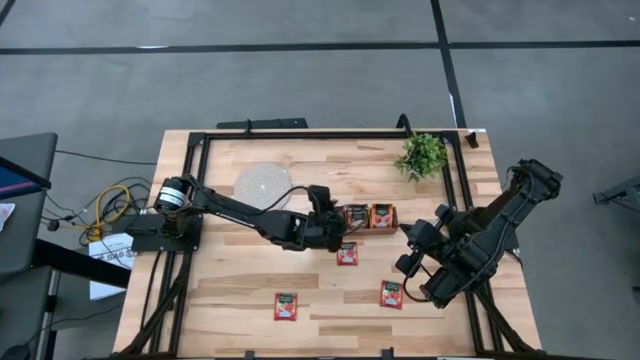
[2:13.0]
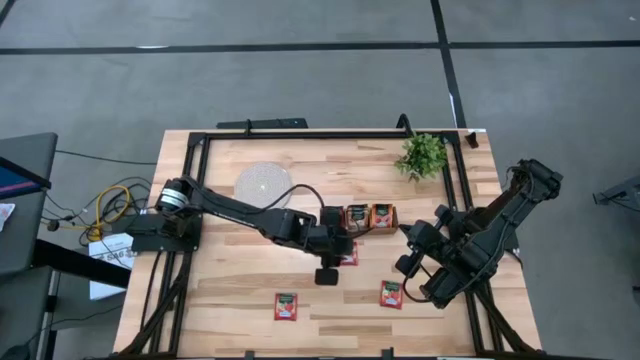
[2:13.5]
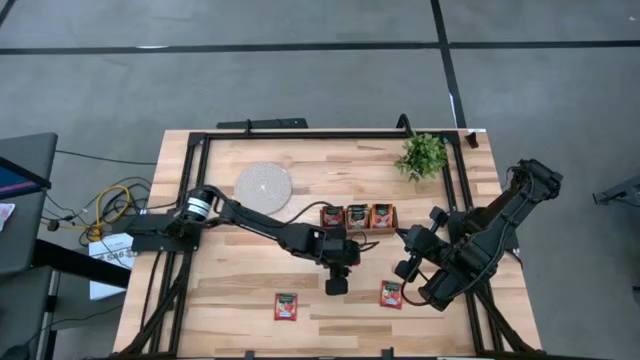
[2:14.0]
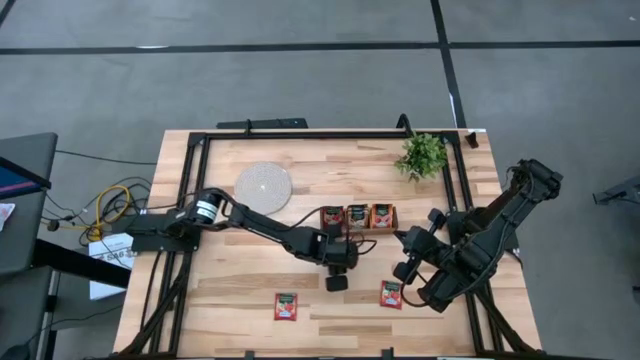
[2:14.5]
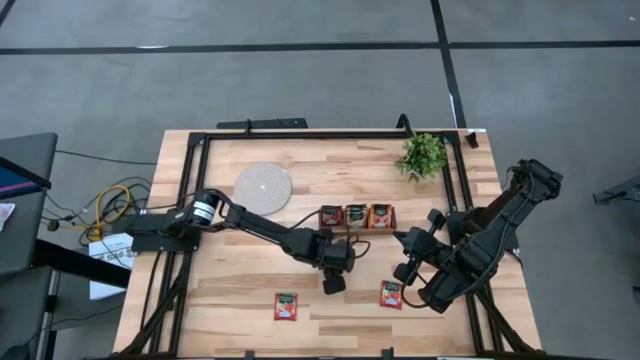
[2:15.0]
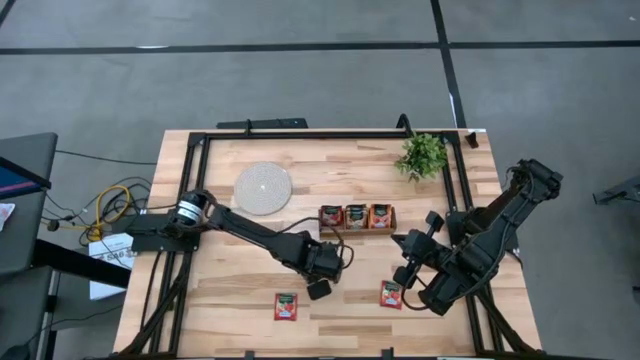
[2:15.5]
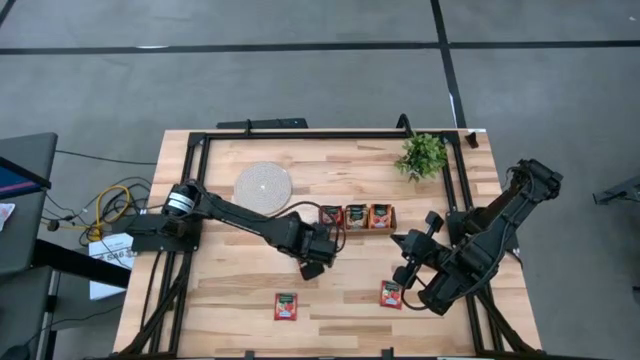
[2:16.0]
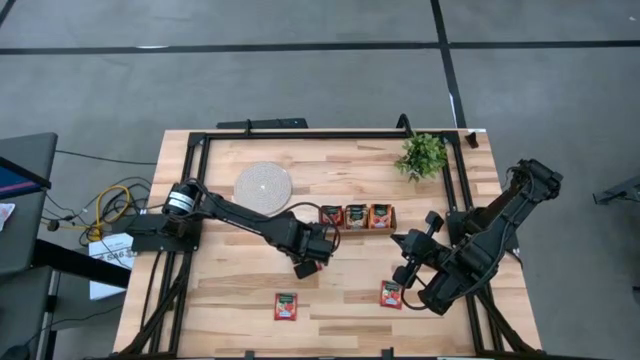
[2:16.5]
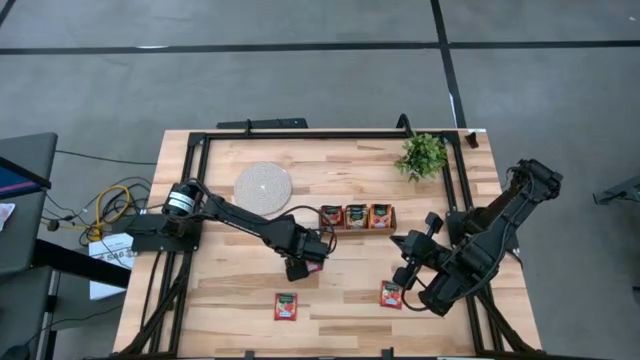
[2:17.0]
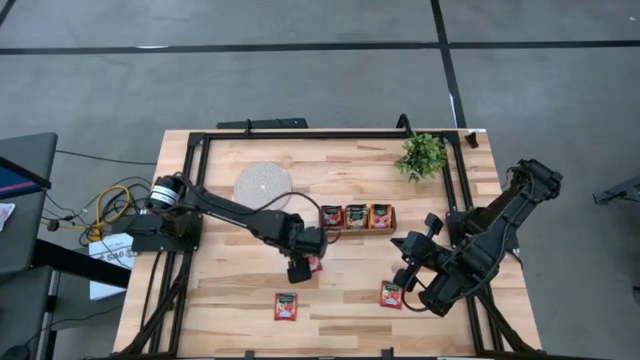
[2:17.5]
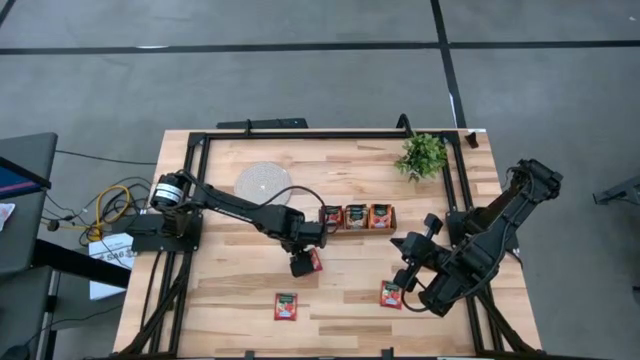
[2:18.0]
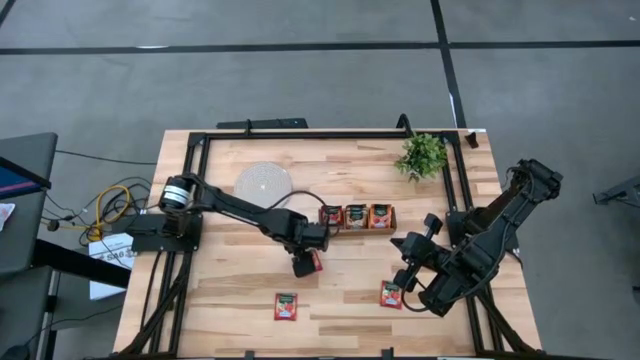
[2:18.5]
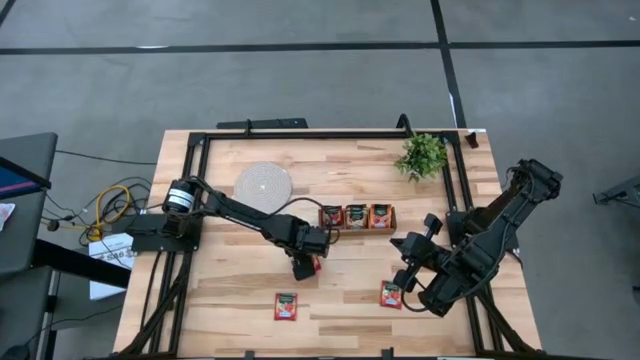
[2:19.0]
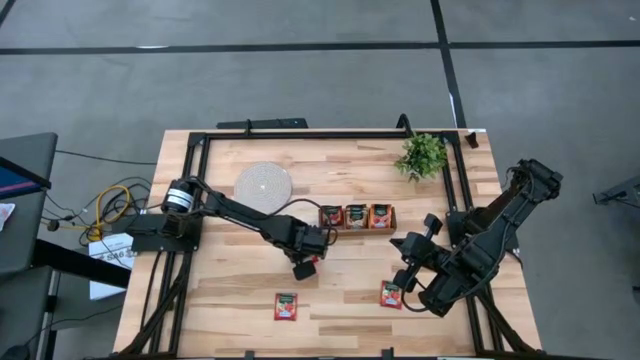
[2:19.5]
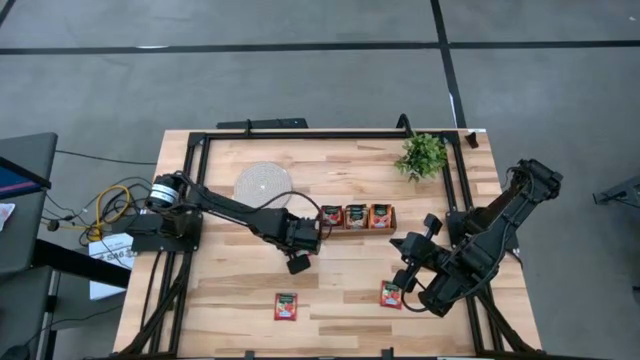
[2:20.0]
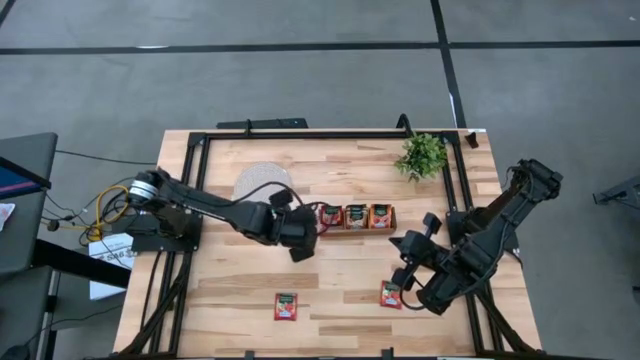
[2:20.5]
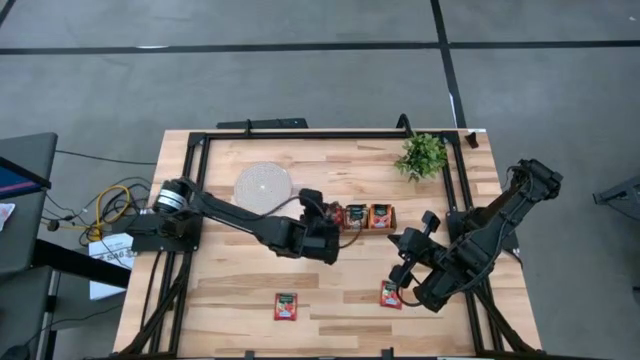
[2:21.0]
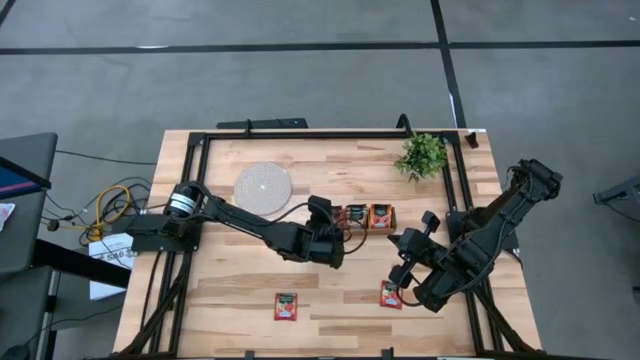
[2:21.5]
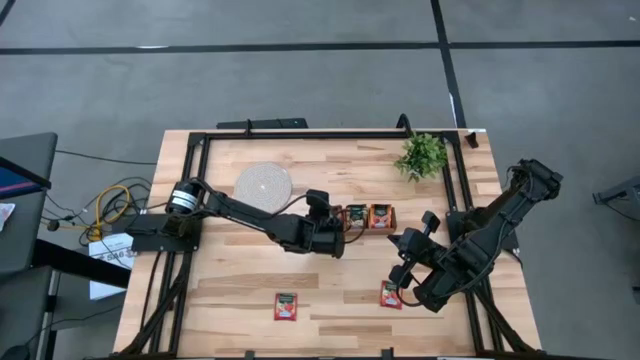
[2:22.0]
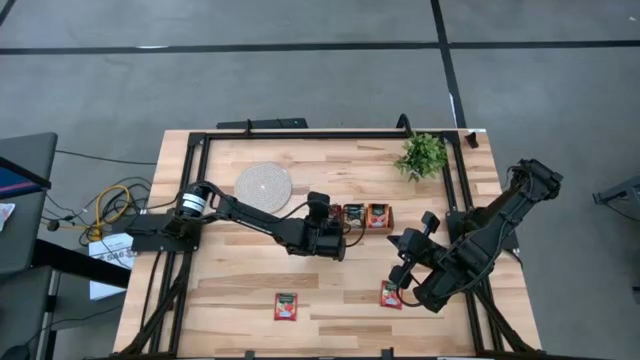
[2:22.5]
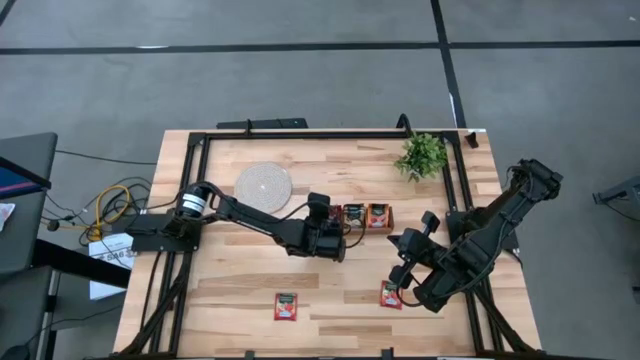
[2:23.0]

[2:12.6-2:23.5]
Task: Pick & Place Tea
Put the red tea bag into the left section of the wooden organizer

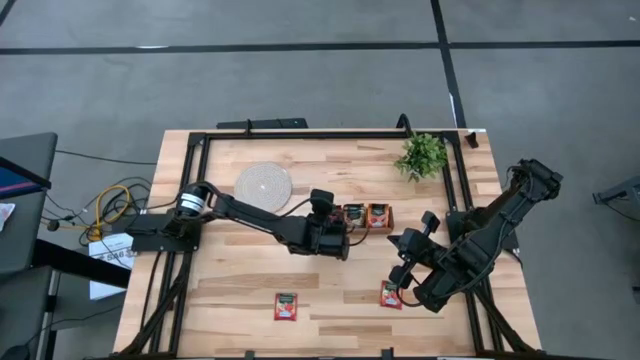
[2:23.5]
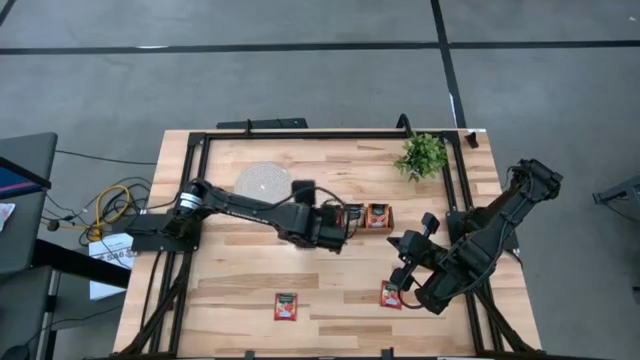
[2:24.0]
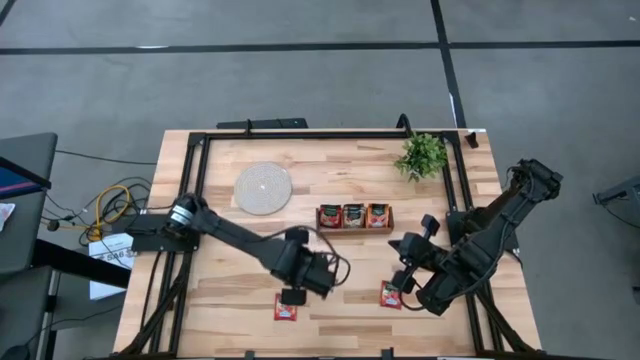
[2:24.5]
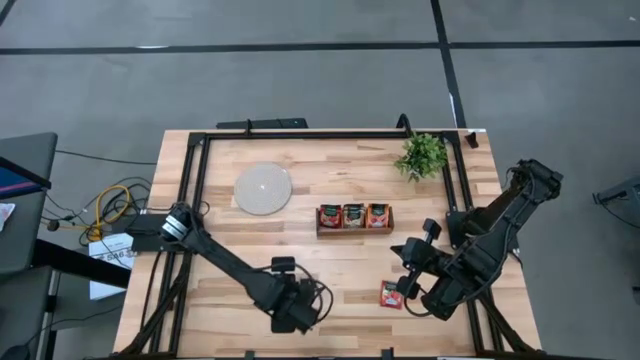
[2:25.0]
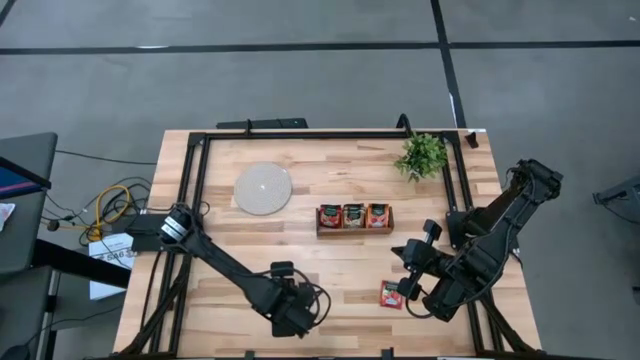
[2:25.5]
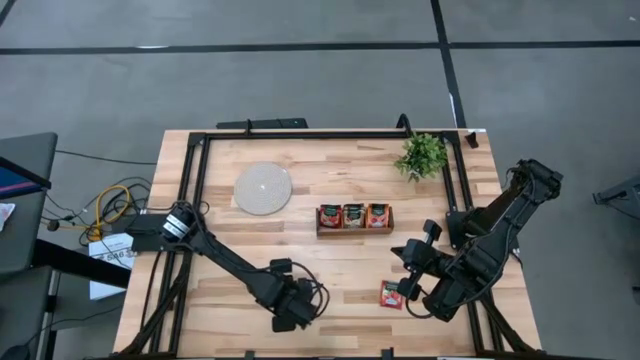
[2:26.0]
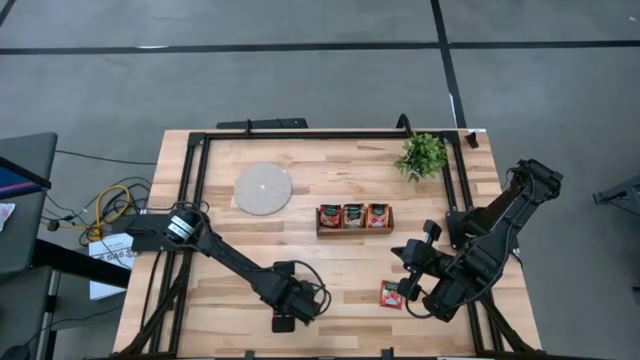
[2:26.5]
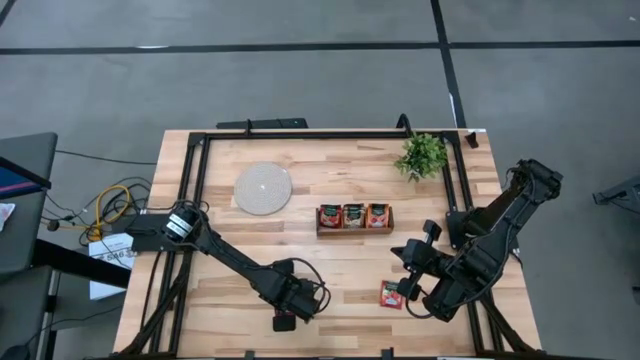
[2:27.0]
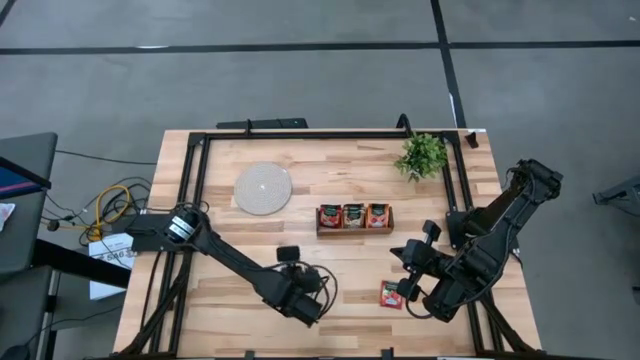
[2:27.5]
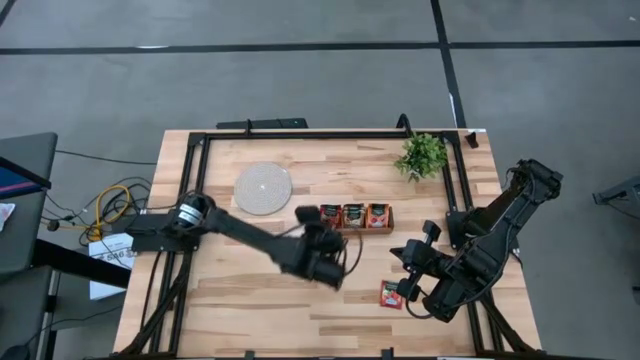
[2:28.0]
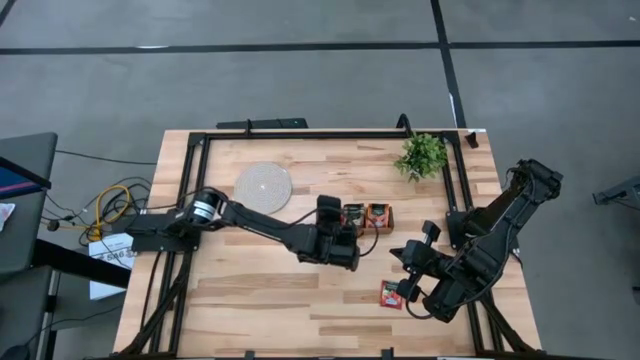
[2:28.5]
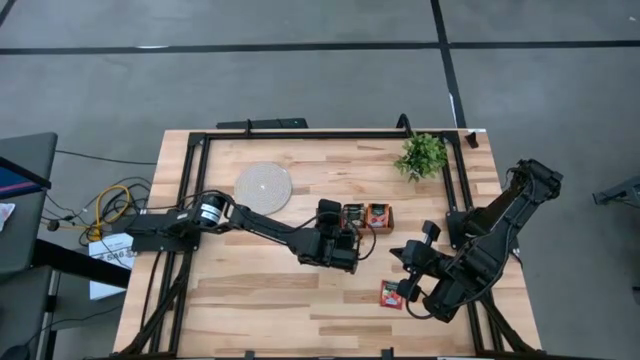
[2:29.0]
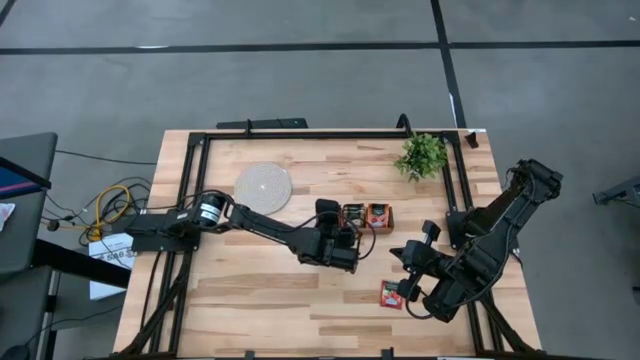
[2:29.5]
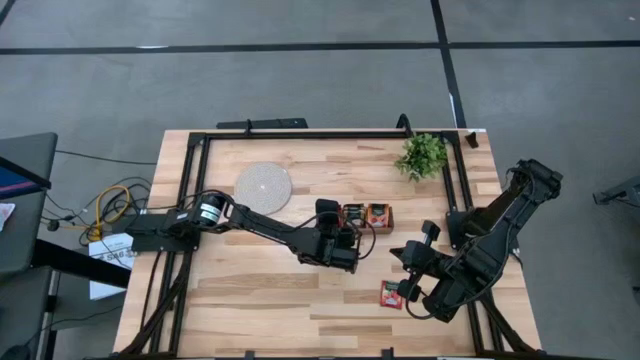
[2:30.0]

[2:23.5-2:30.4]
Put the red tea bag into the left section of the wooden organizer

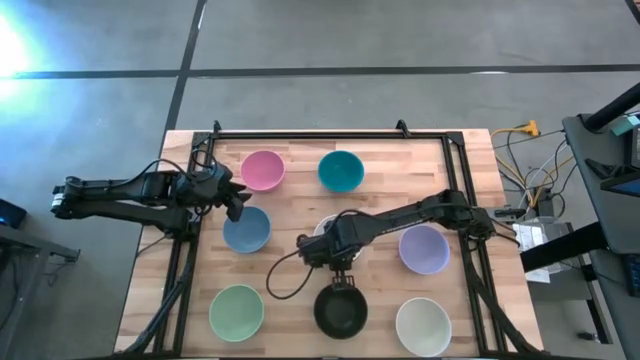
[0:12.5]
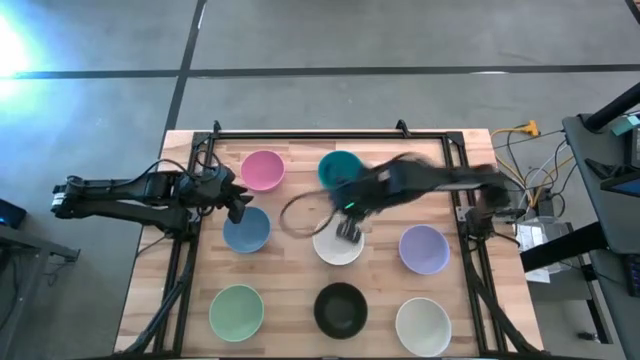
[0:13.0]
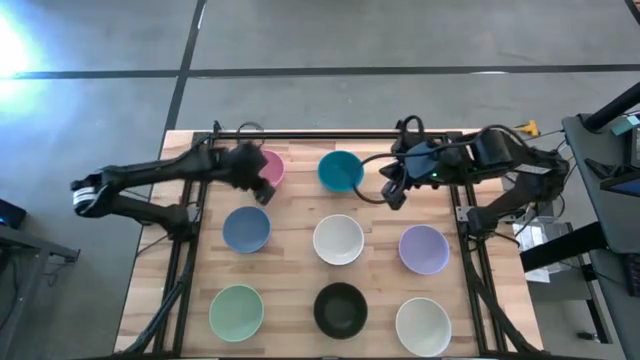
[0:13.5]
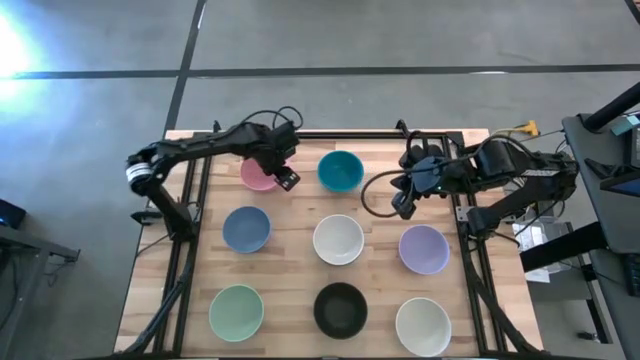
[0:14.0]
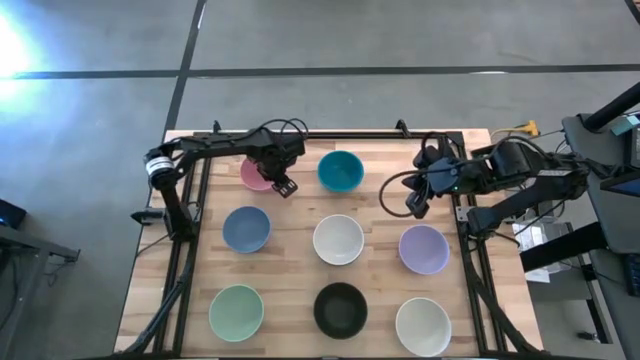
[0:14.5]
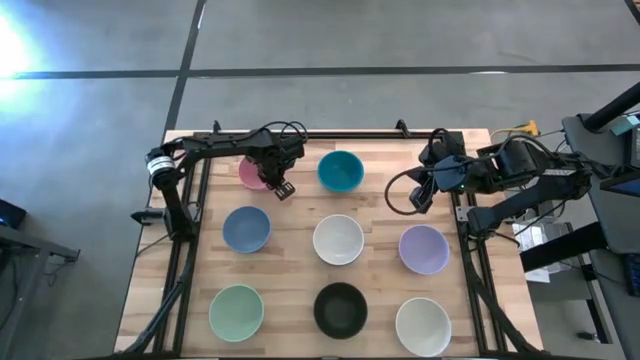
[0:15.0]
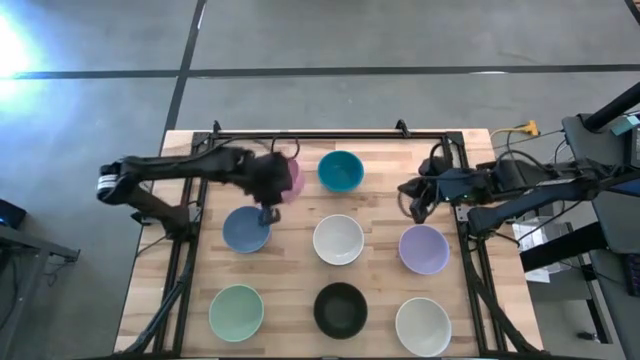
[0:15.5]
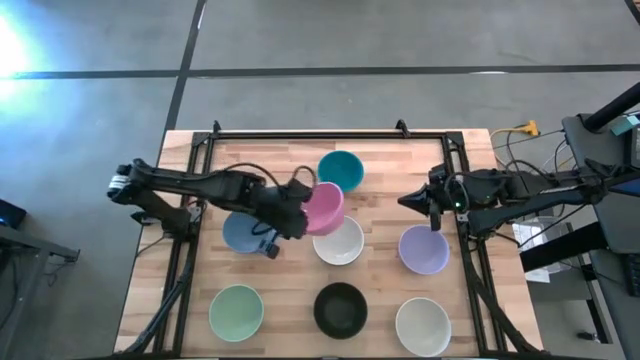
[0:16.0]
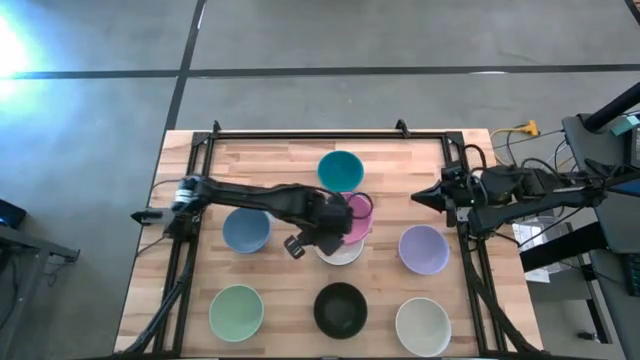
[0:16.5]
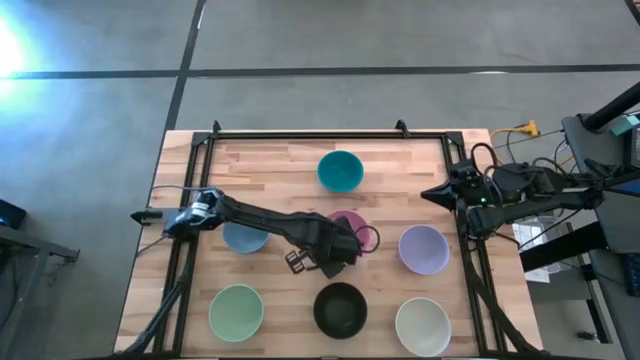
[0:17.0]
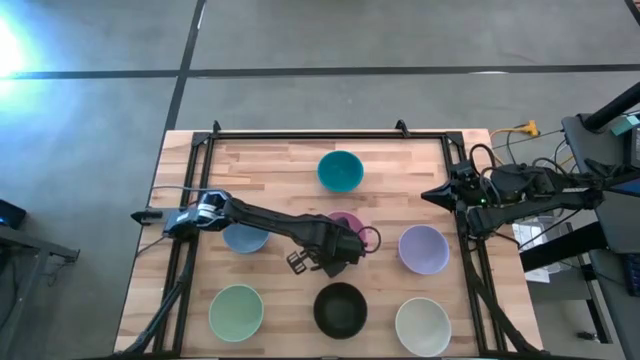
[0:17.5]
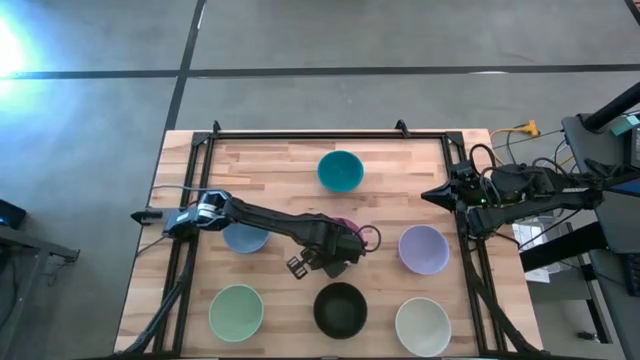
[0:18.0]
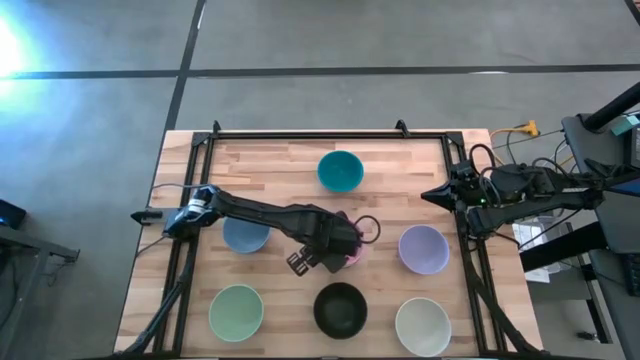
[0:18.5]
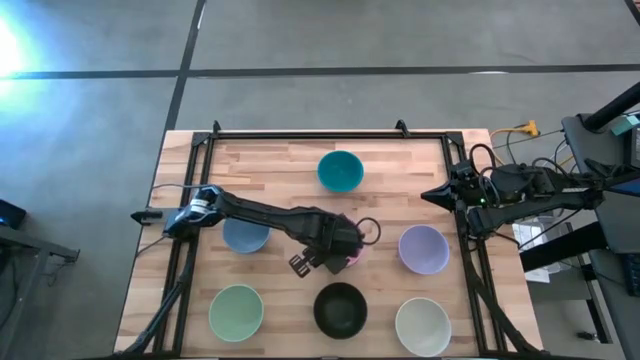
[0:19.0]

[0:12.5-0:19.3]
Task: Nest bowls inside each other
Stack the pink bowl on the top white bowl
